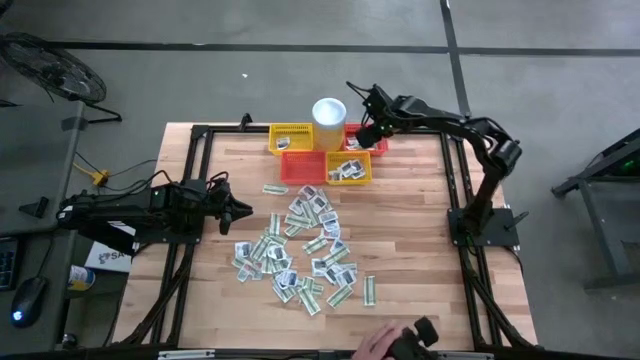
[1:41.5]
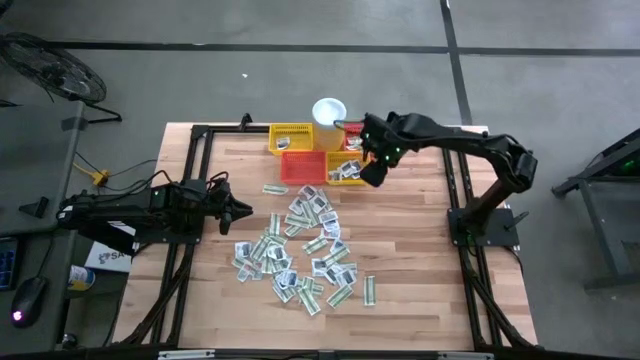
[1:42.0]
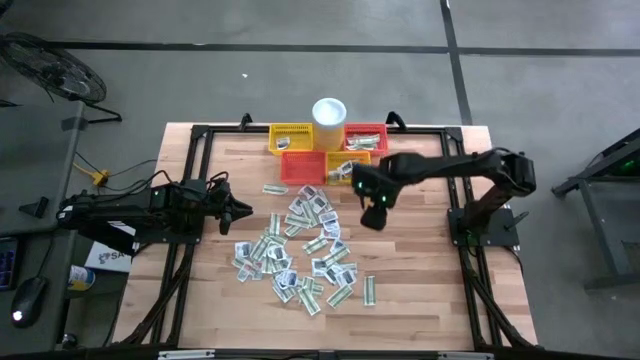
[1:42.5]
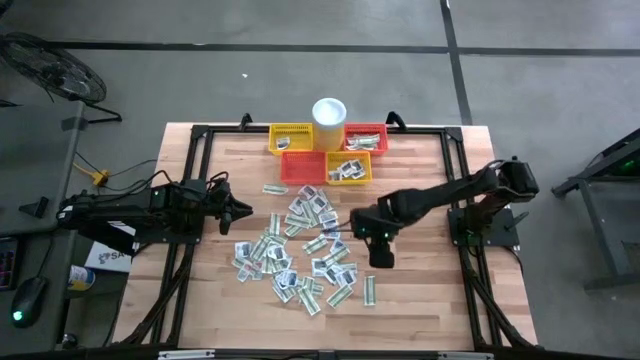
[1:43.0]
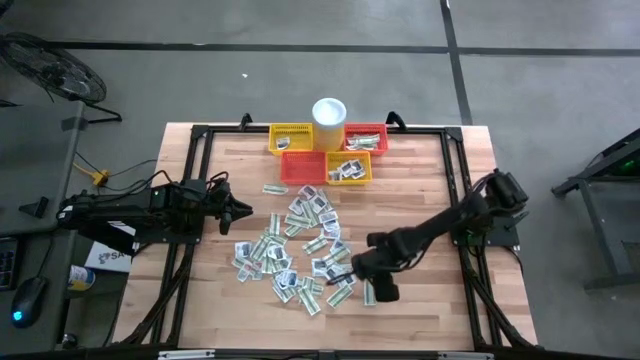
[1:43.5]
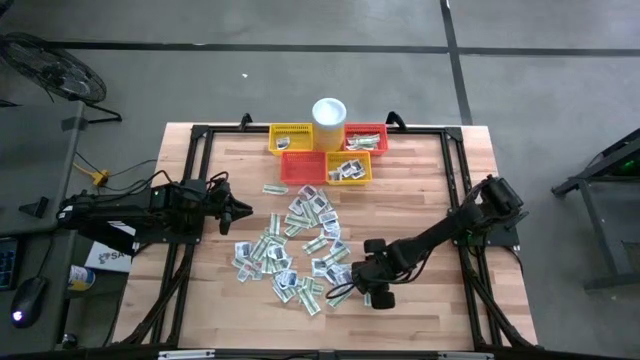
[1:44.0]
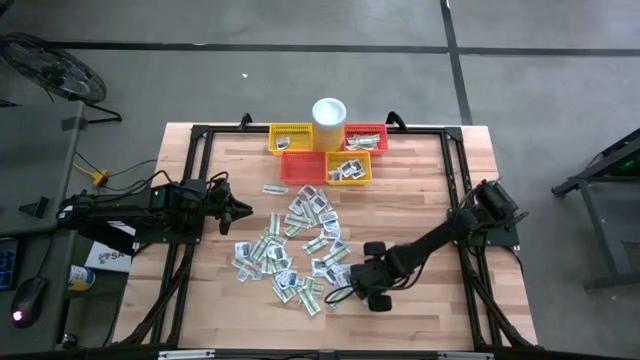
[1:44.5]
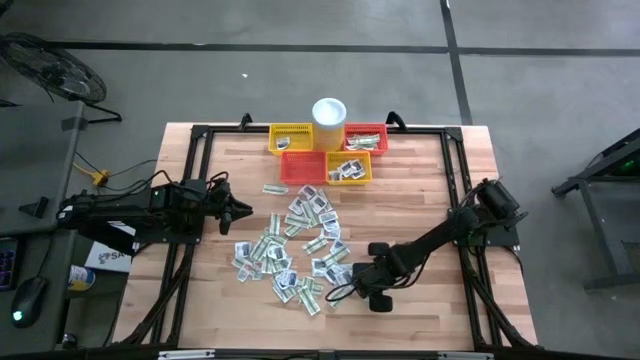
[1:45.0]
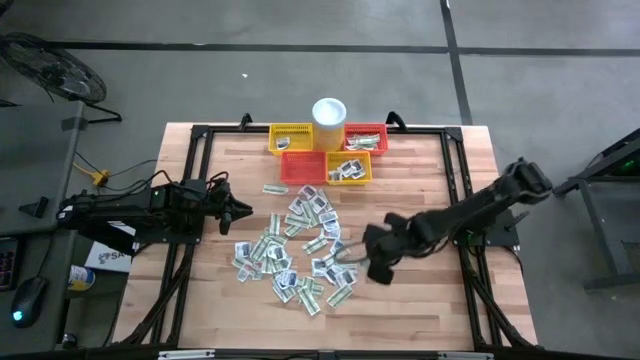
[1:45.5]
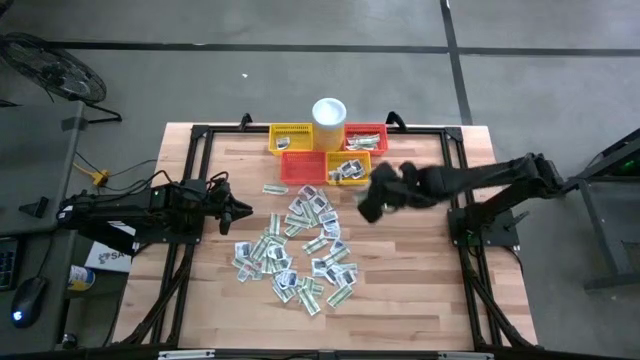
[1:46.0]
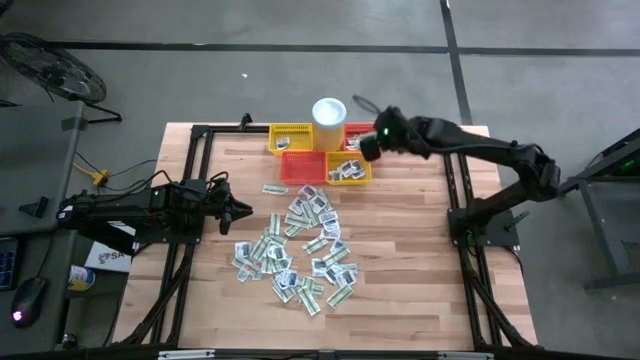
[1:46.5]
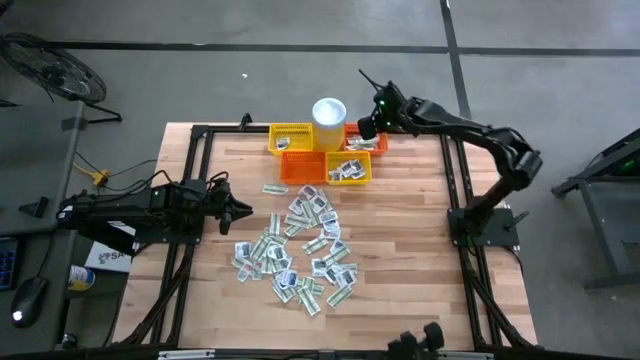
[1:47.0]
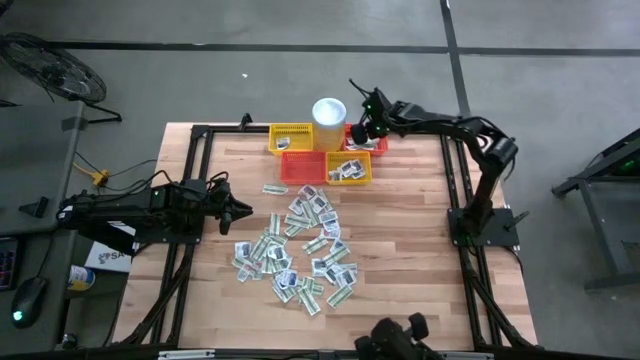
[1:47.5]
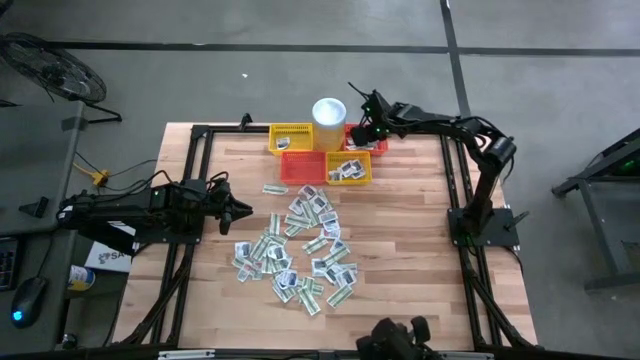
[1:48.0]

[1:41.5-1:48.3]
Task: Pick & Place First Aid Supplies
Put the green bandage pack into the top orange basket

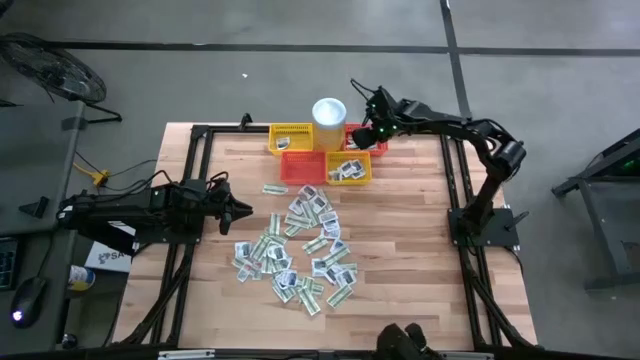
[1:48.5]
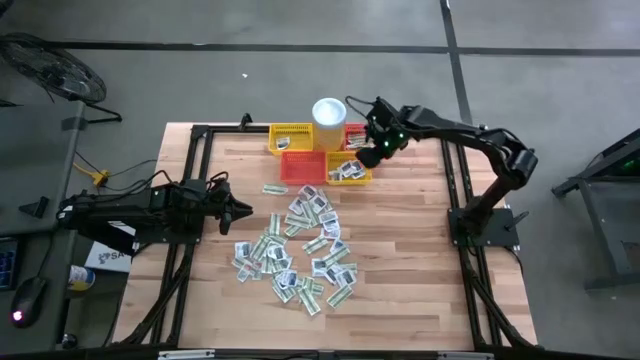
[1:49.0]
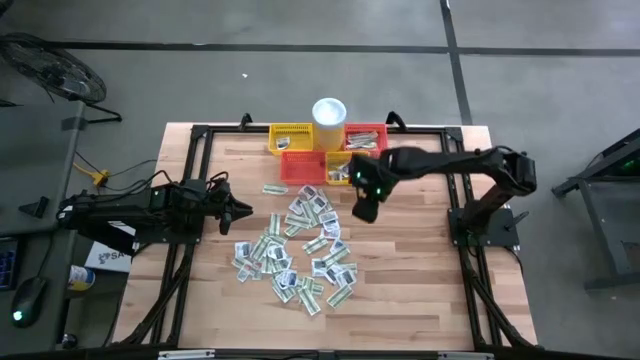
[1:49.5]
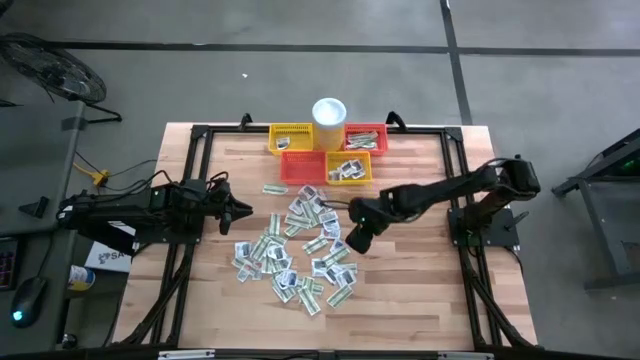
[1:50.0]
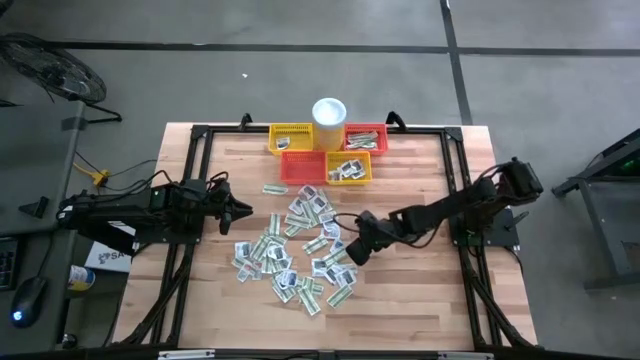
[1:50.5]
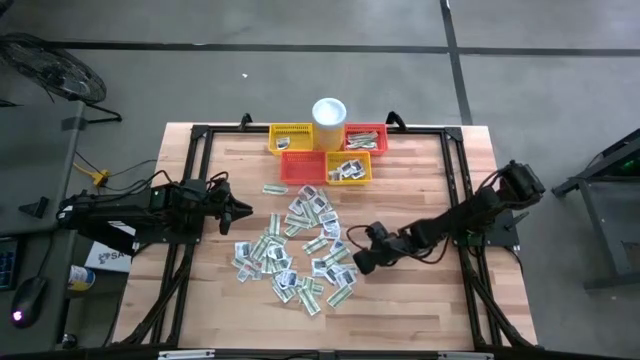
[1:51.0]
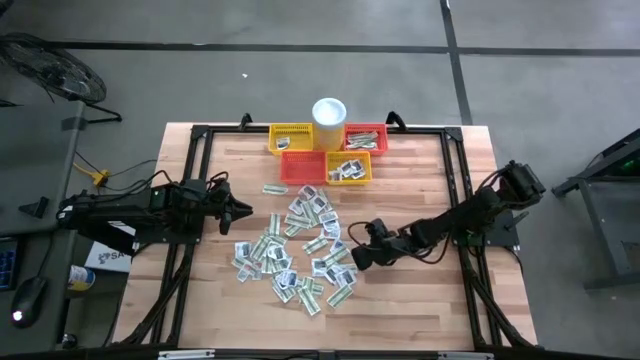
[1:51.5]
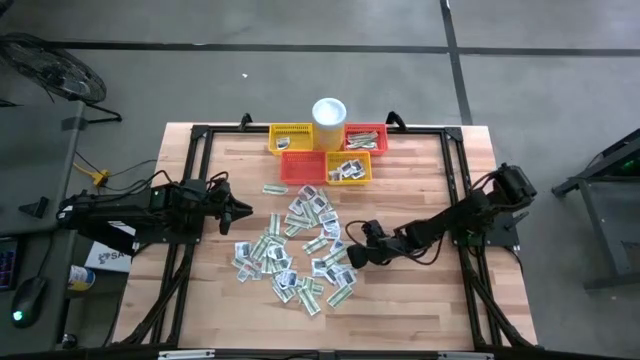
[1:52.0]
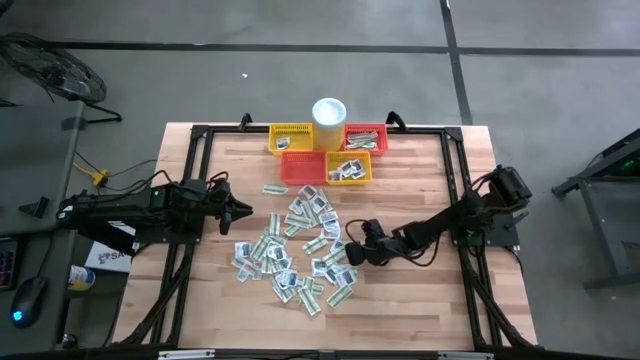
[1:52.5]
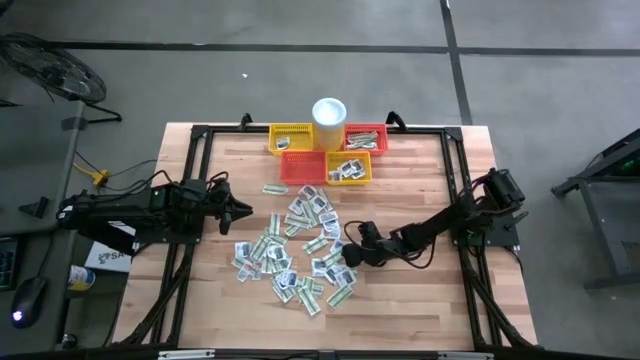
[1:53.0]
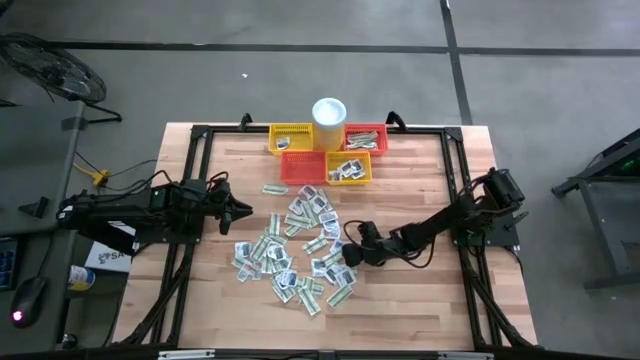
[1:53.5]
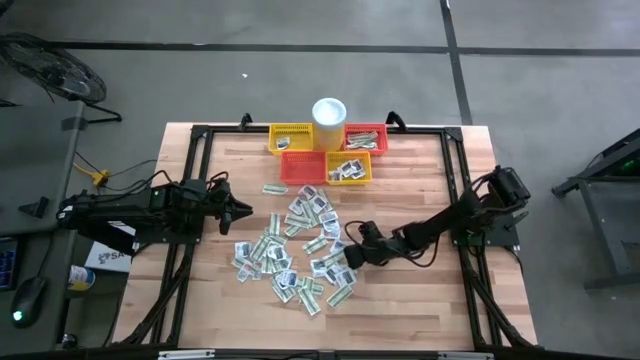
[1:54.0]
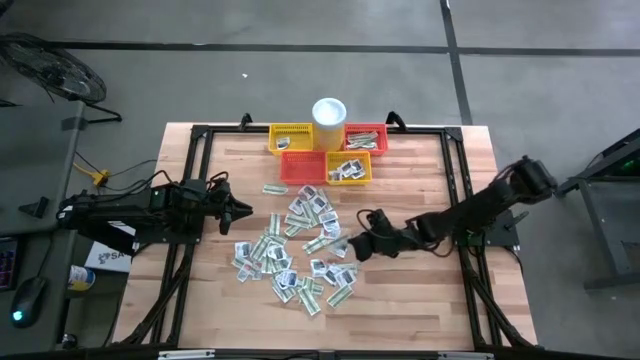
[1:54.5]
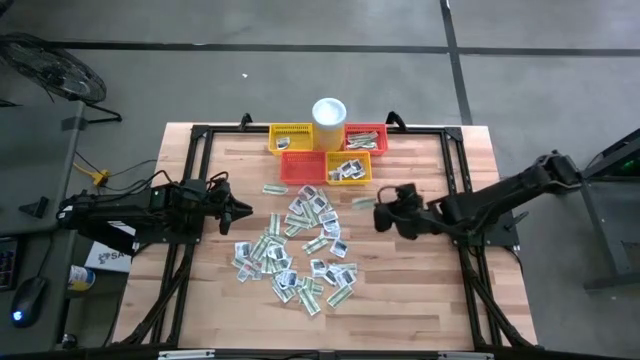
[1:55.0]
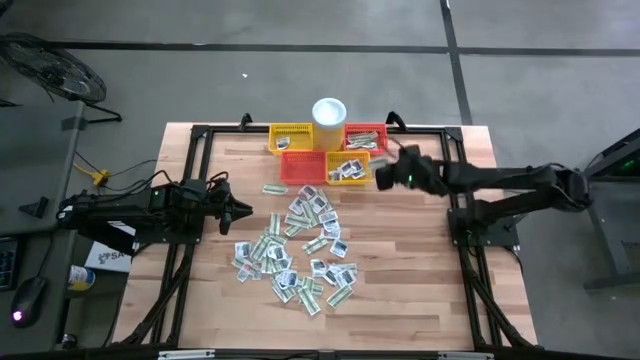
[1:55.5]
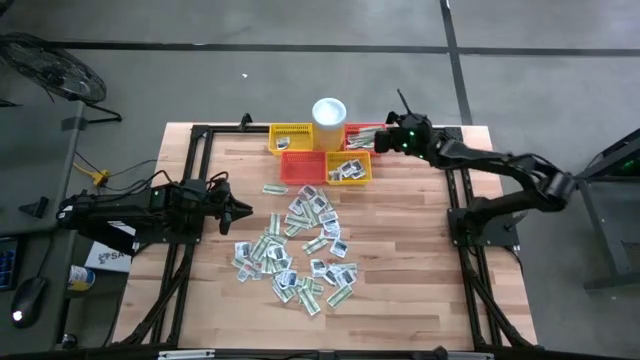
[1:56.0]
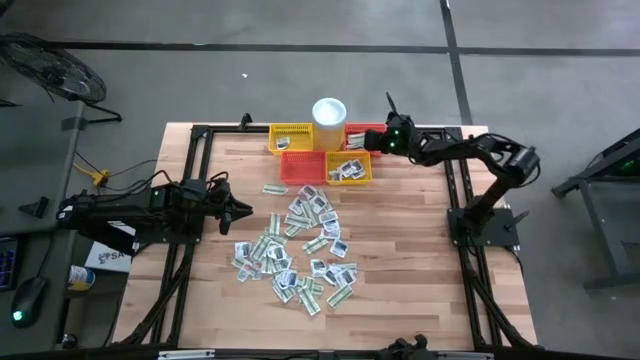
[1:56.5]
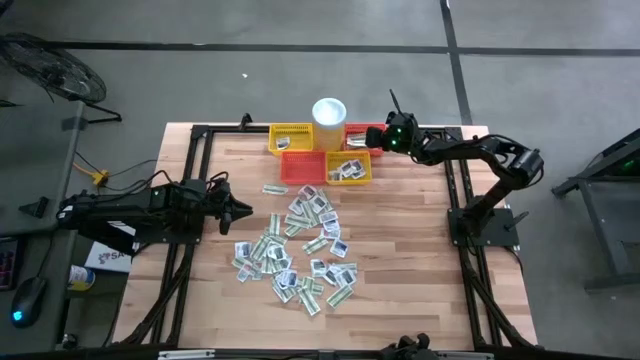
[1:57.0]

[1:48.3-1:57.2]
Put the green bandage pack into the top orange basket
